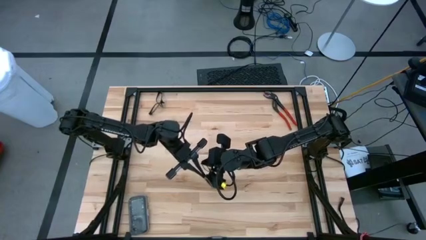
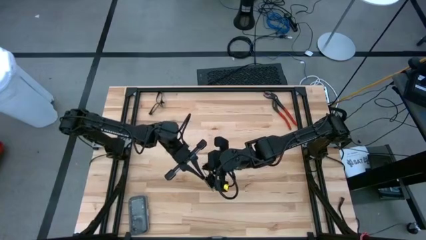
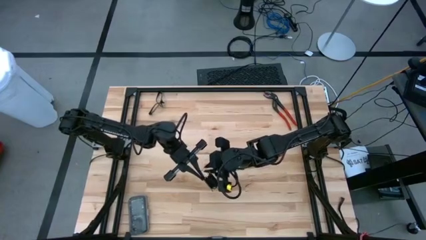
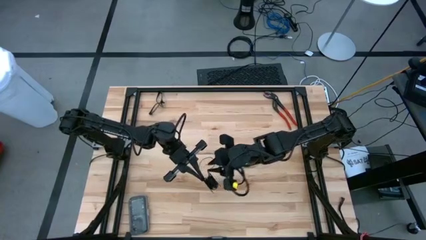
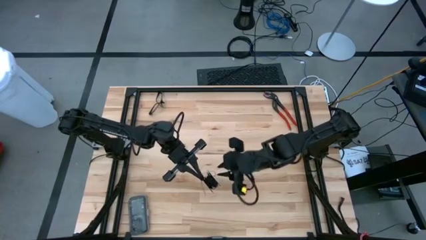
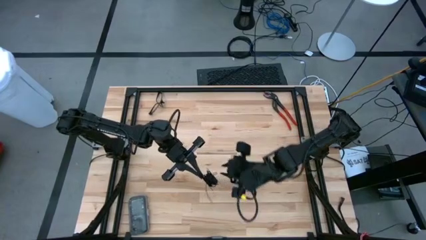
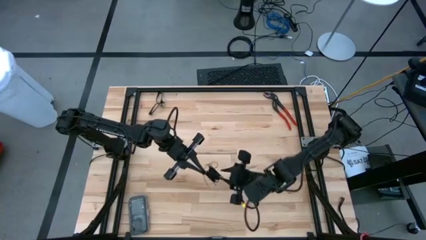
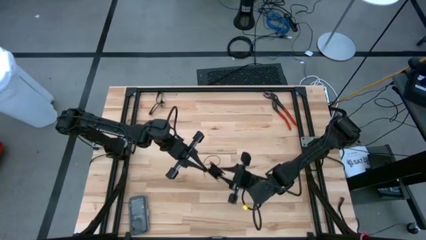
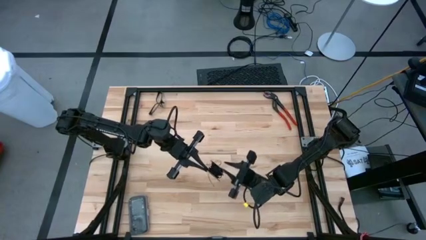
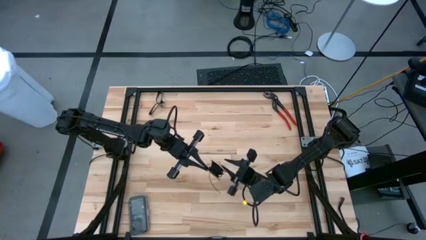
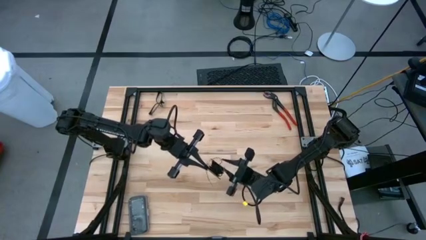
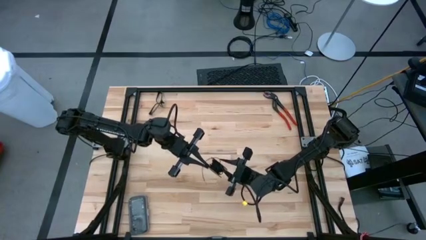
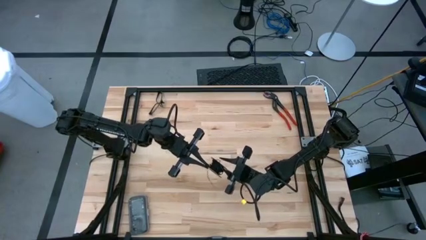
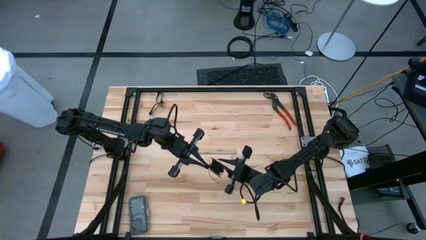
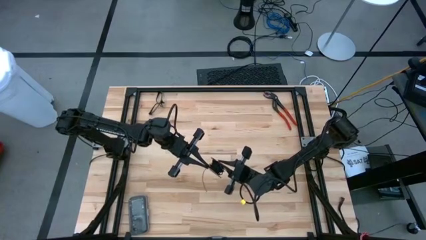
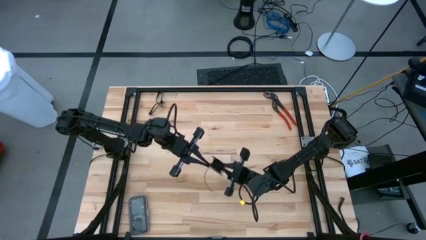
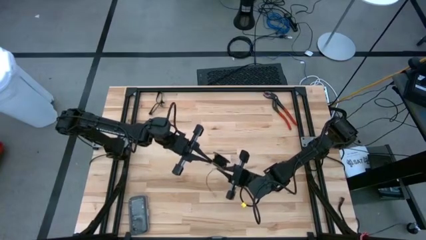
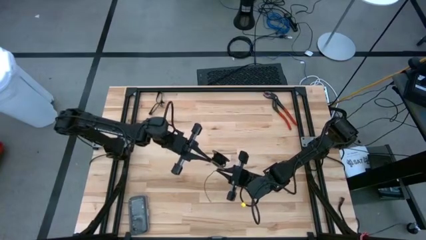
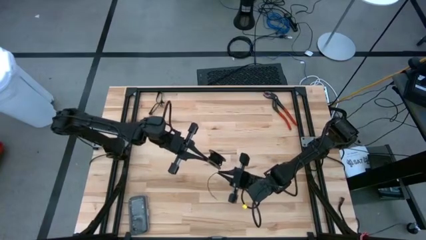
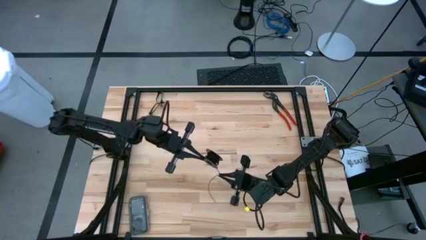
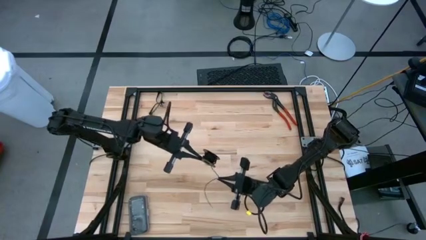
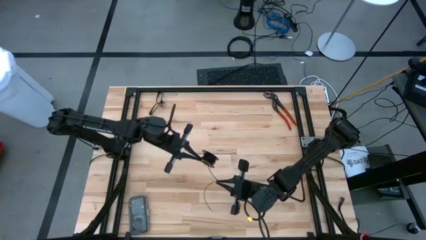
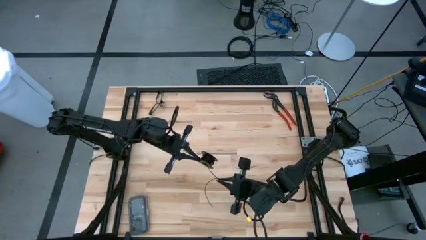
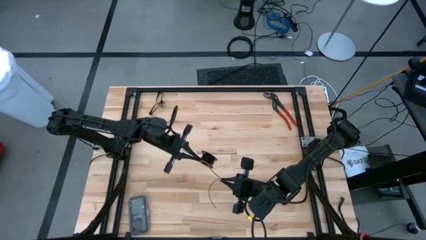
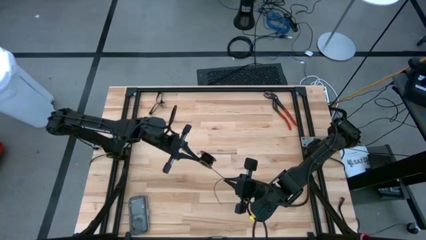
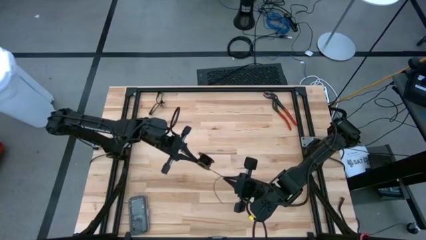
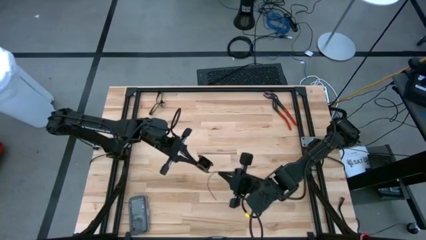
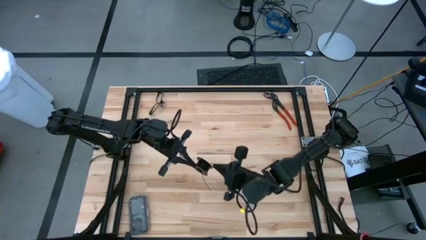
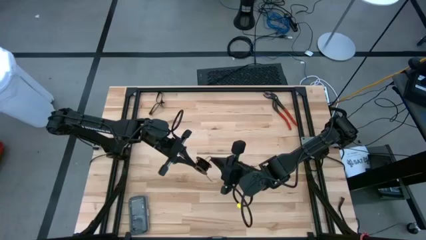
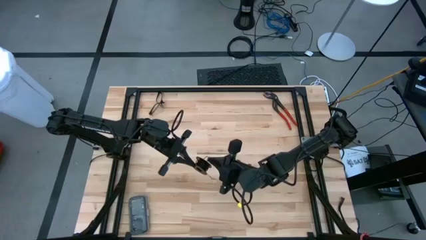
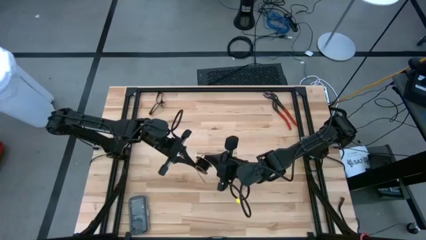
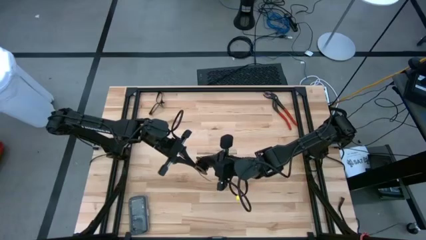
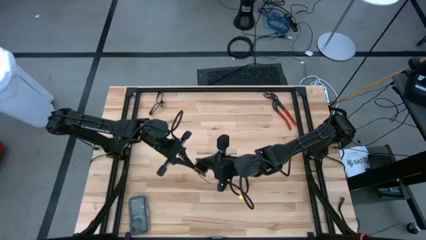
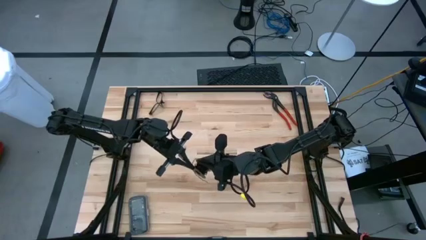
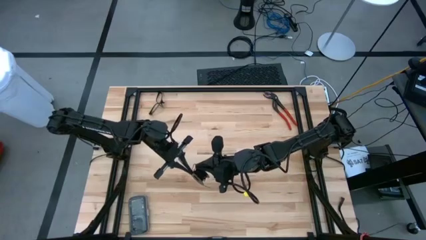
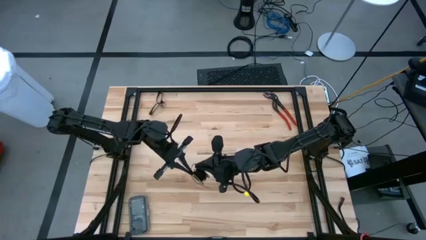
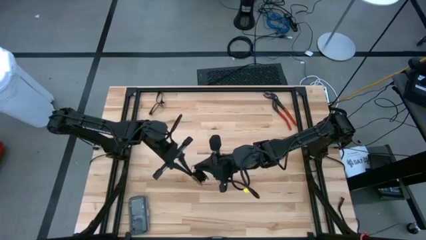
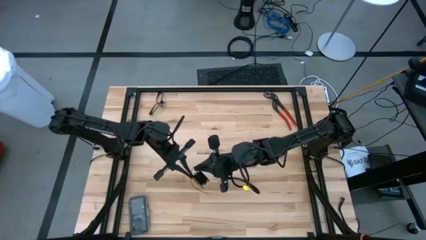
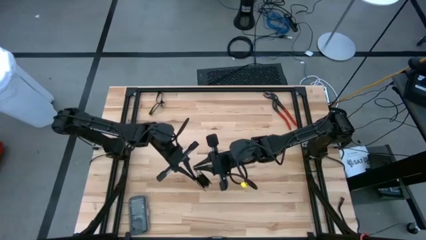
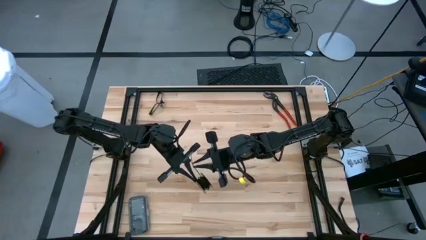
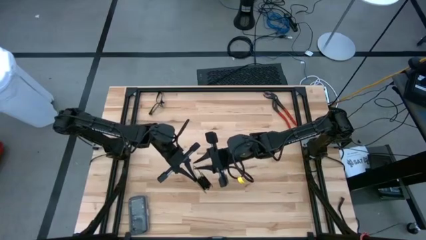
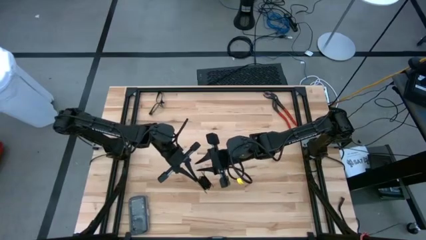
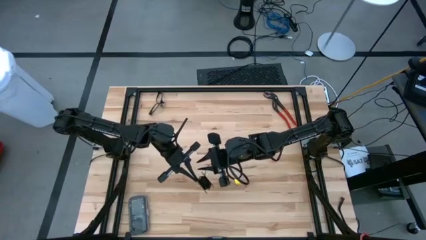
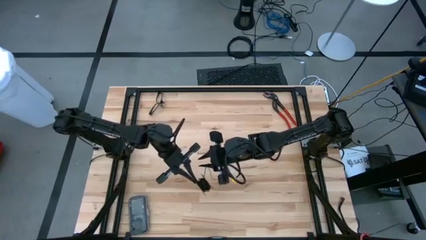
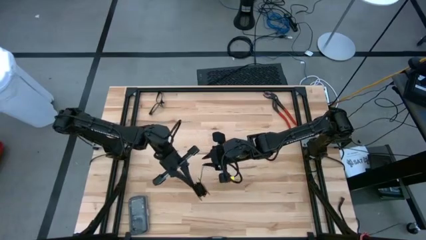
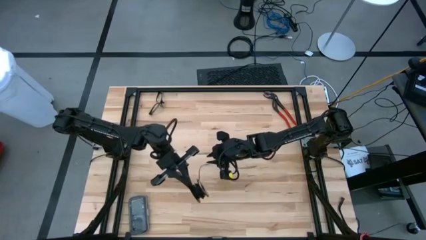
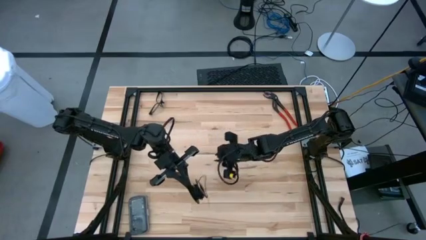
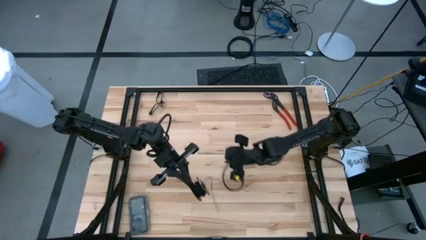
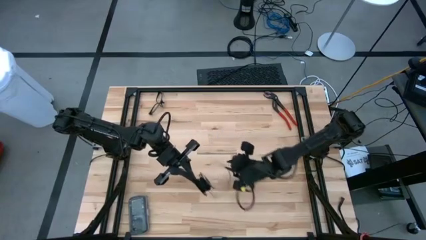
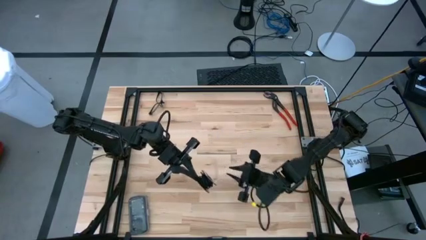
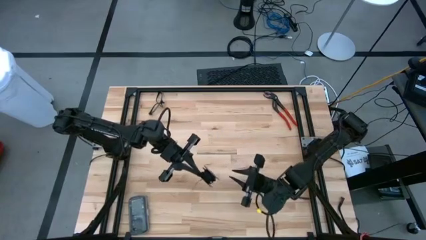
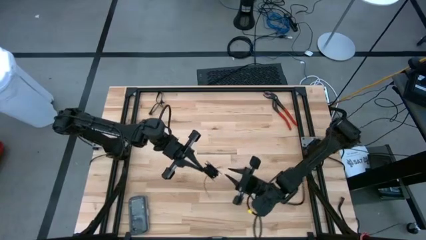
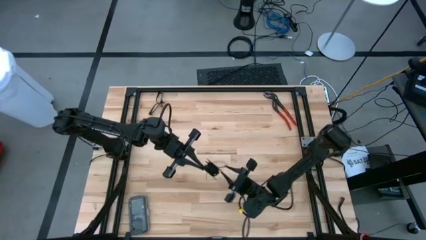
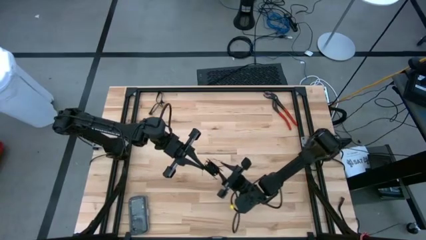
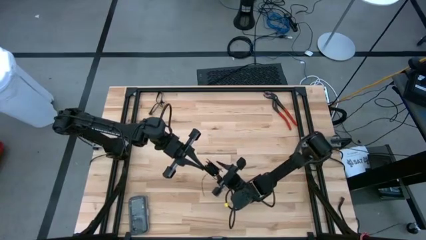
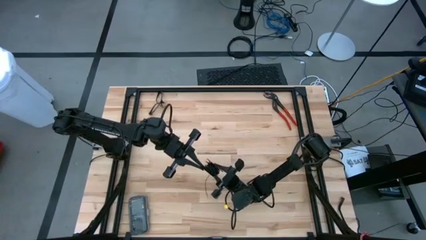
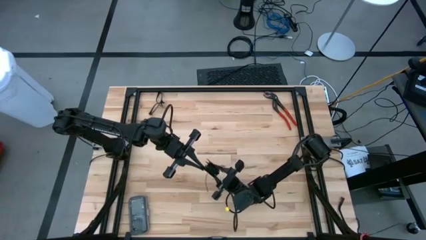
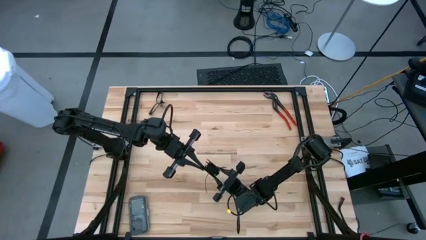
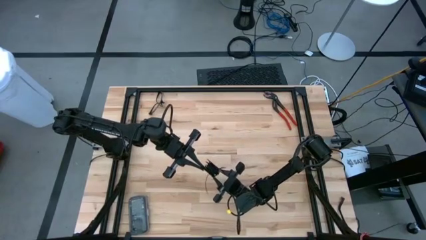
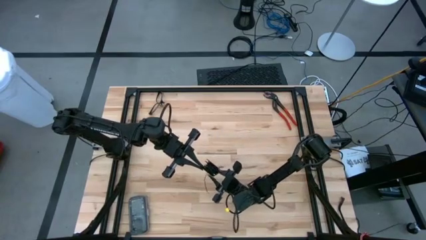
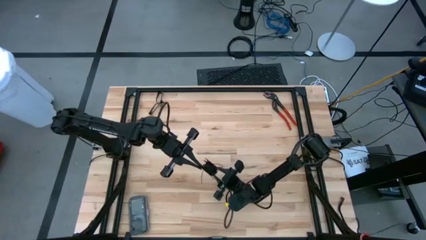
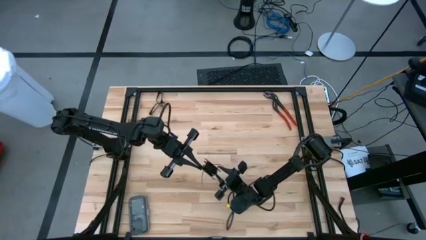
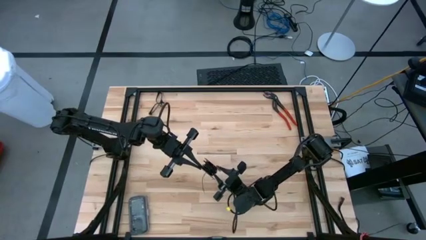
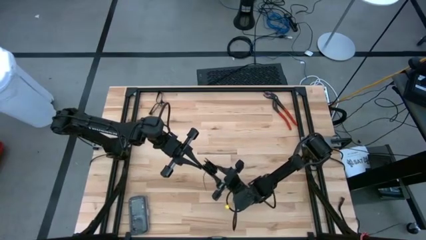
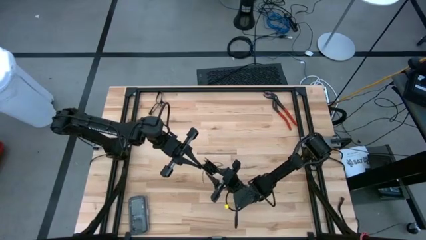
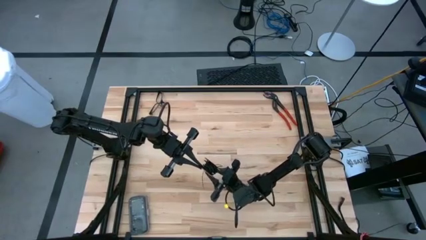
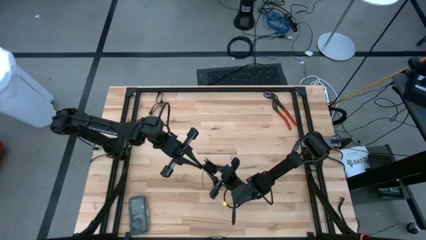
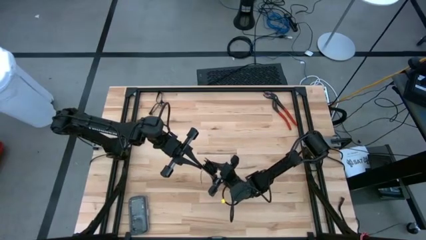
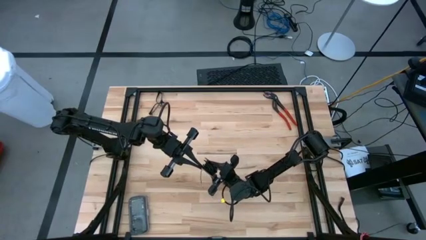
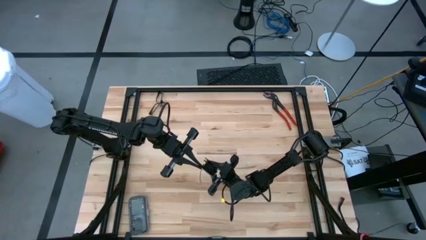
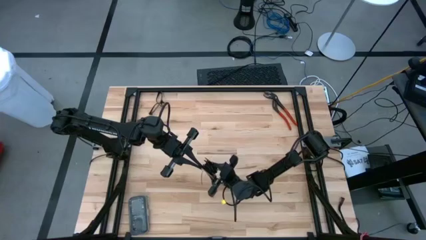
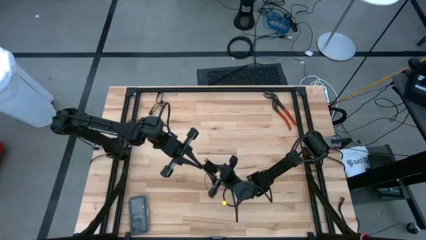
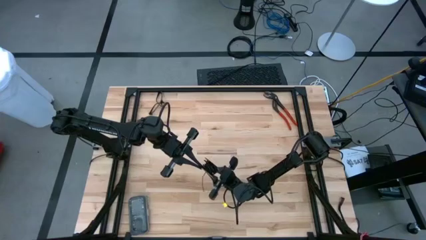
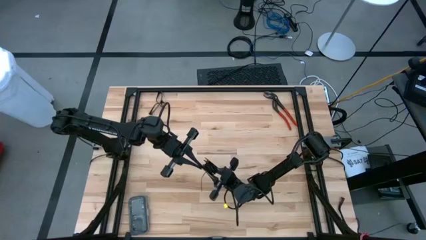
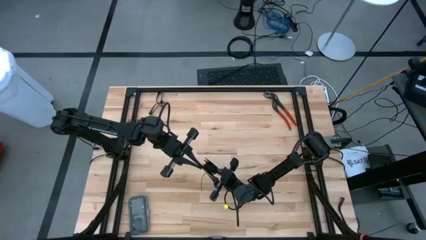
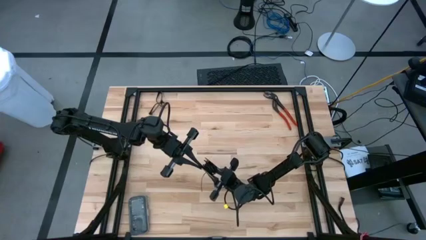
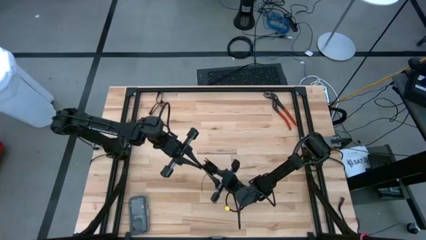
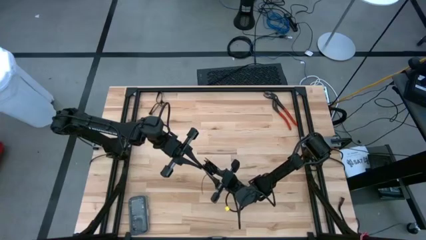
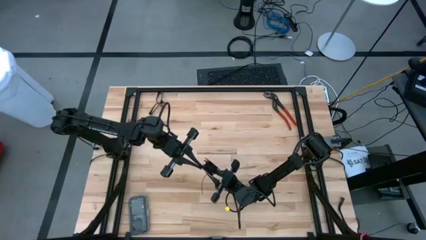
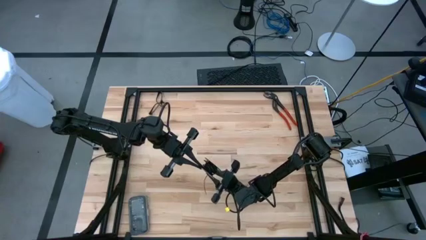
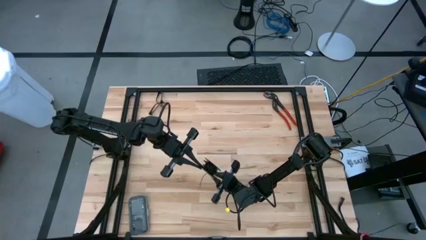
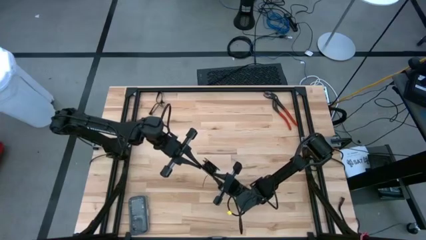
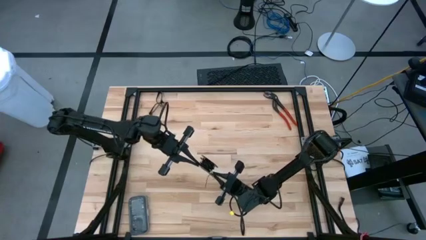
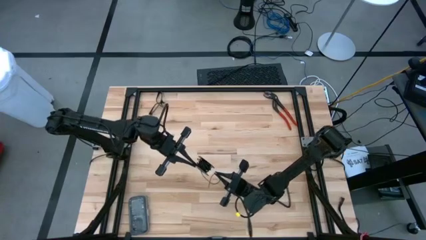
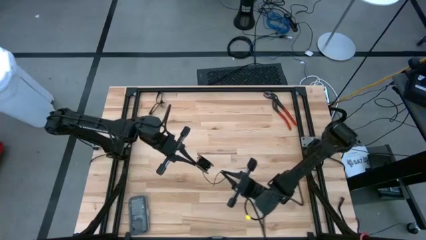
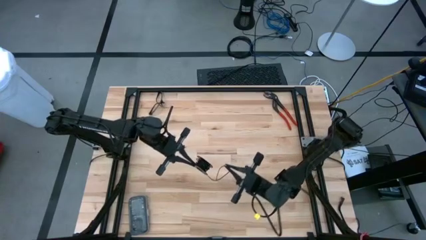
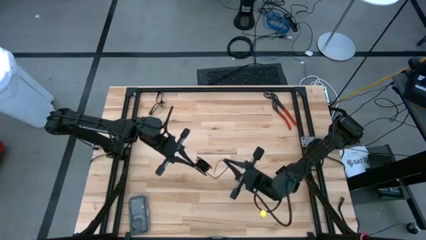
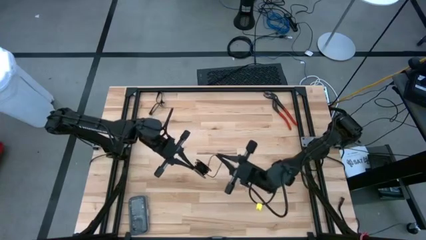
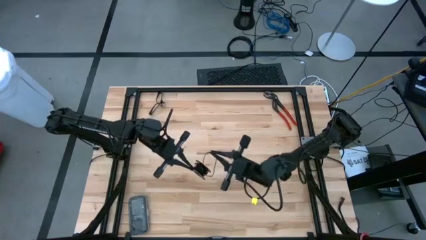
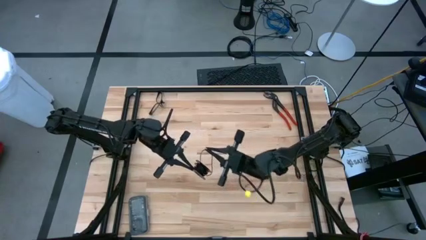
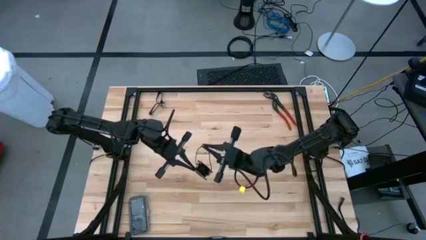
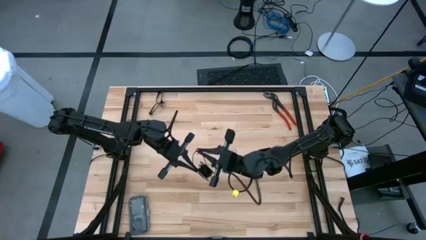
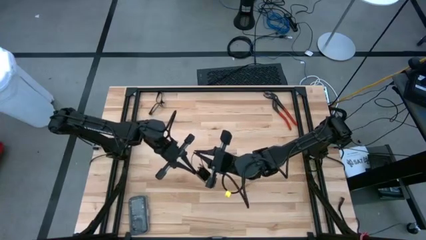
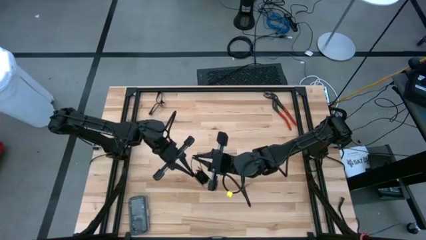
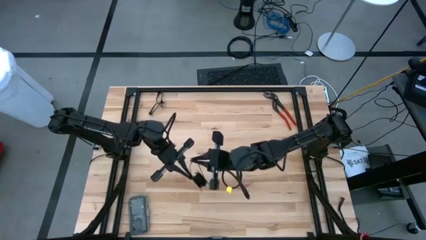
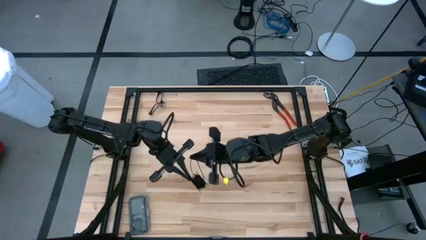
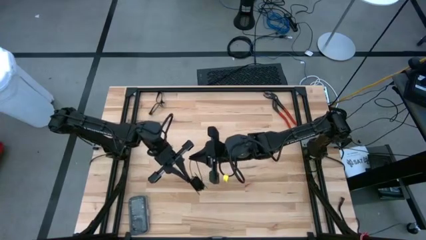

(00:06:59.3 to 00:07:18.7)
Task: Coil cords
Coil the black wire onto the spool
